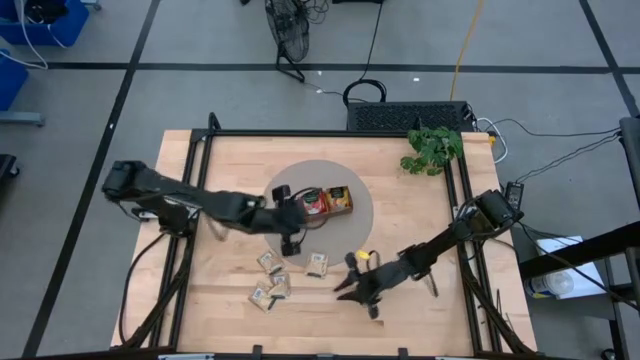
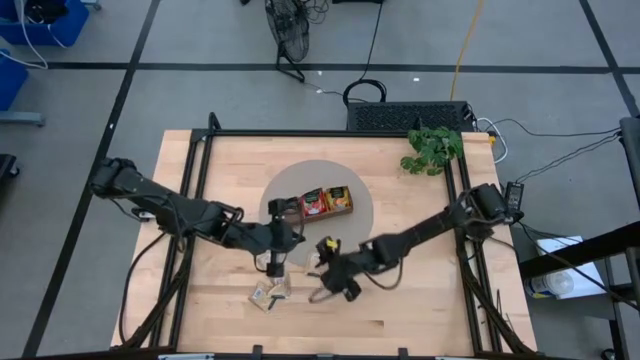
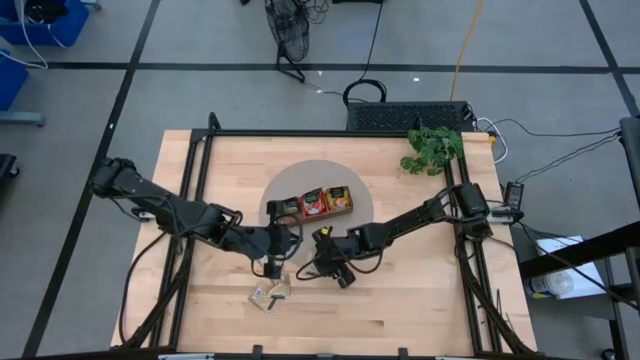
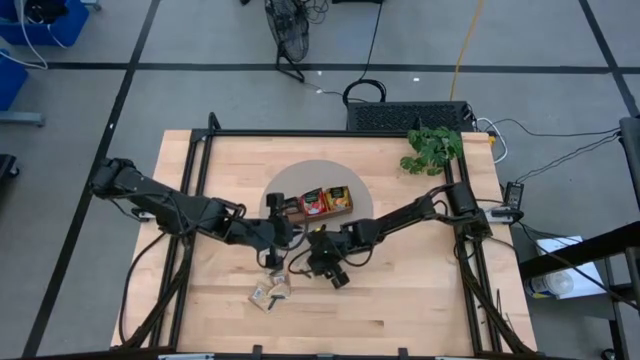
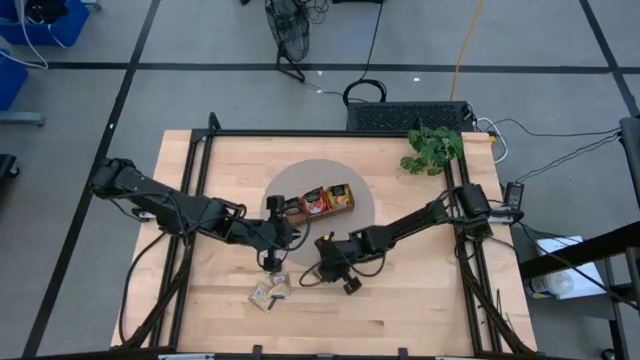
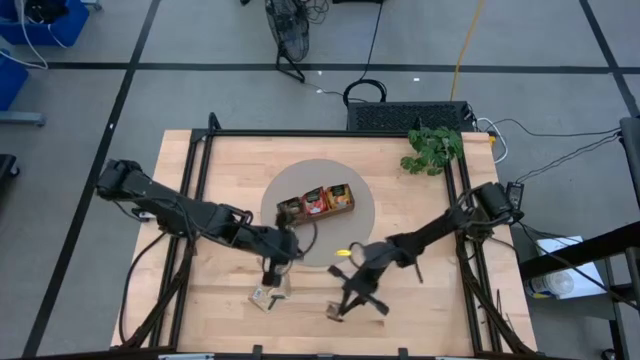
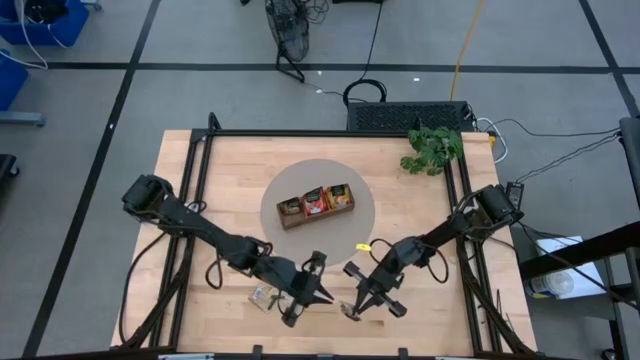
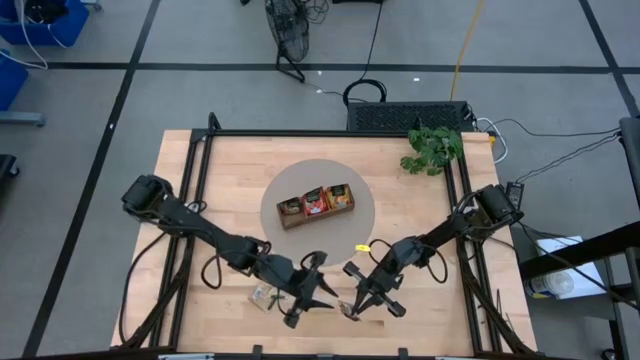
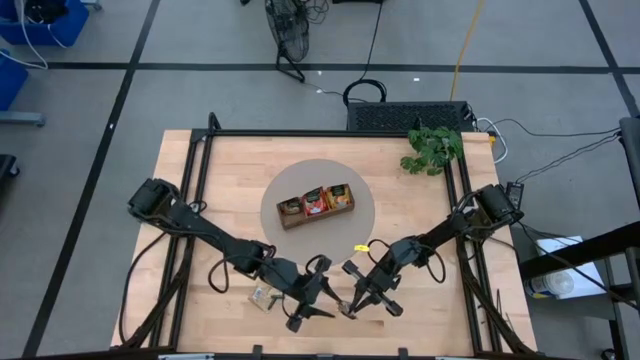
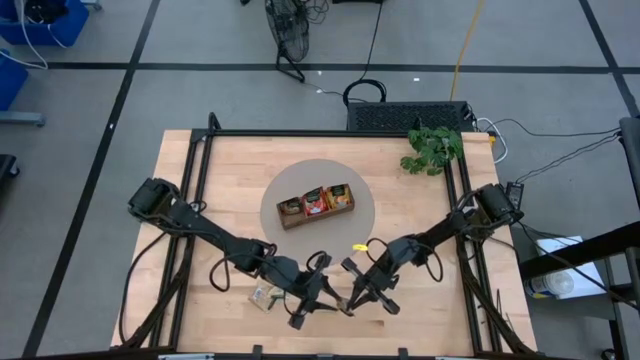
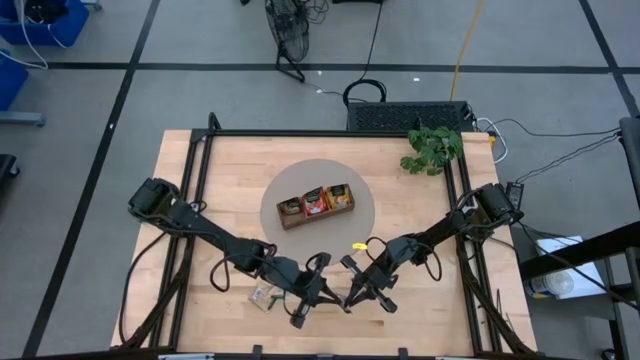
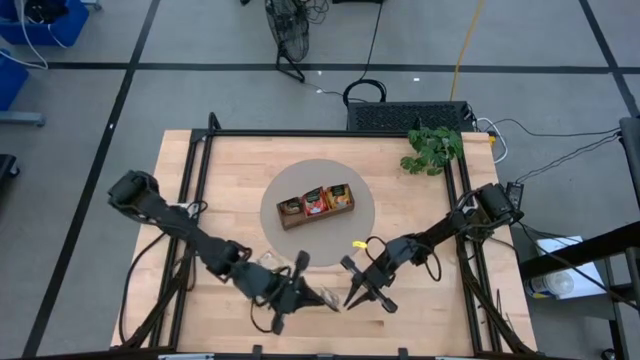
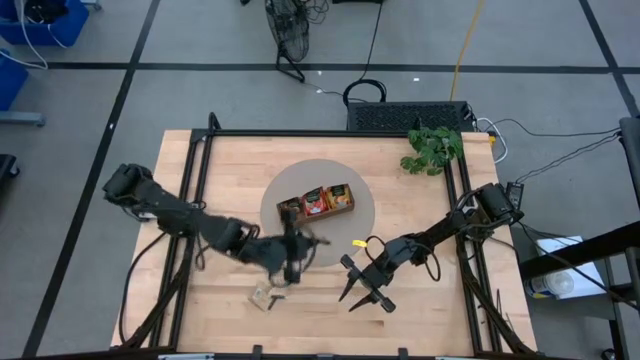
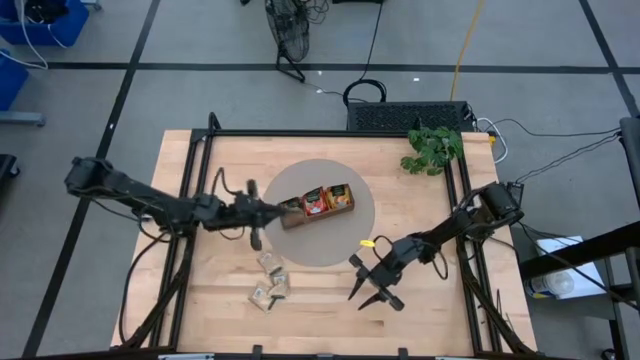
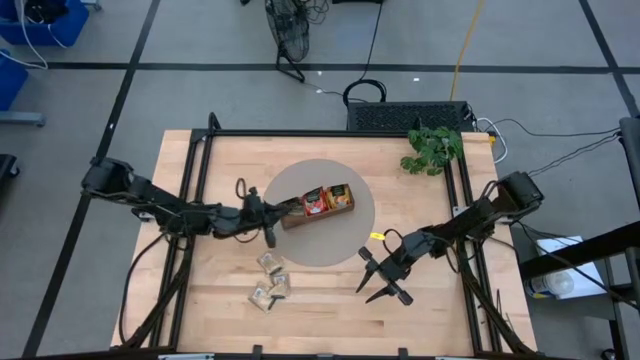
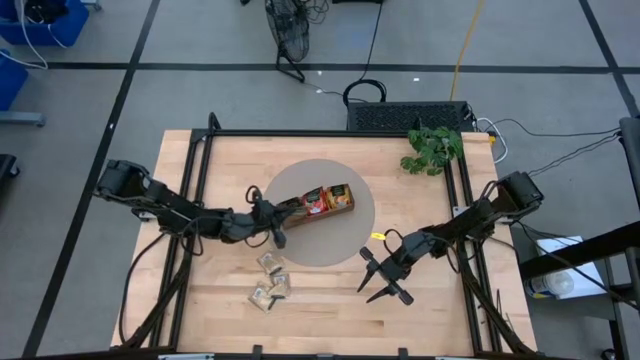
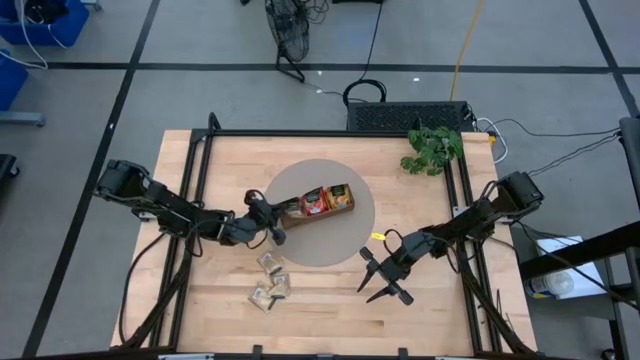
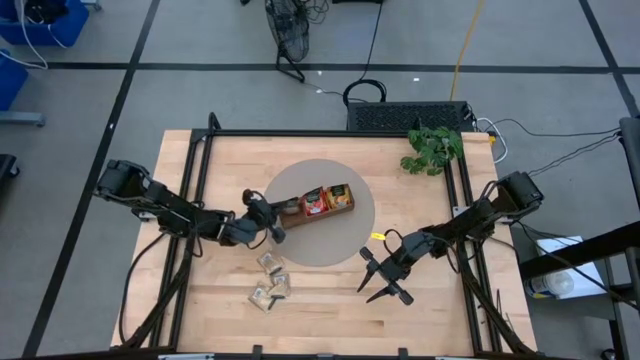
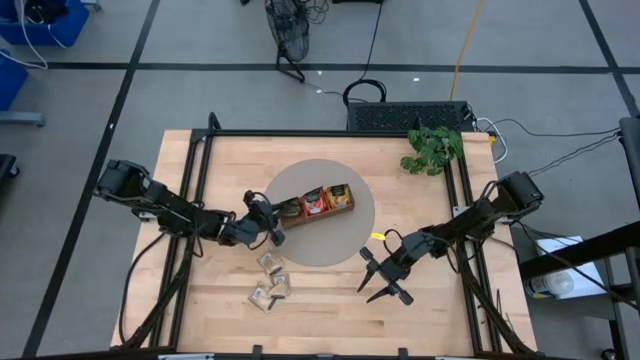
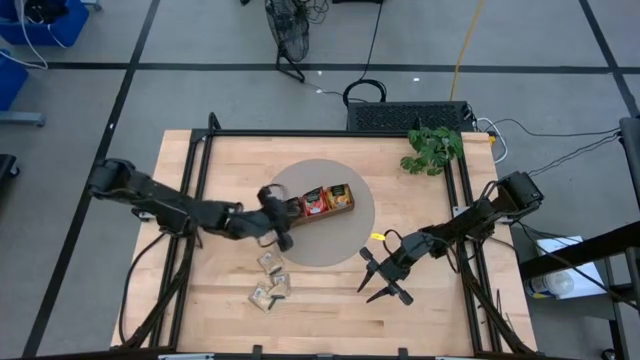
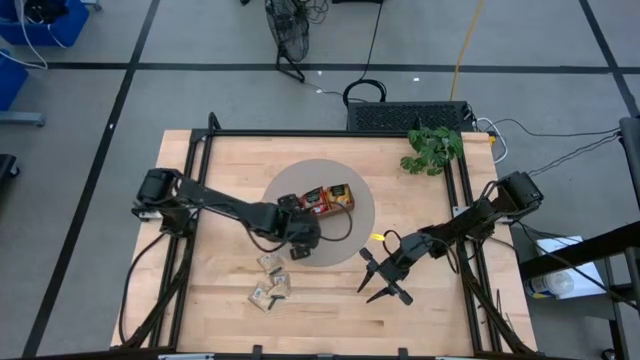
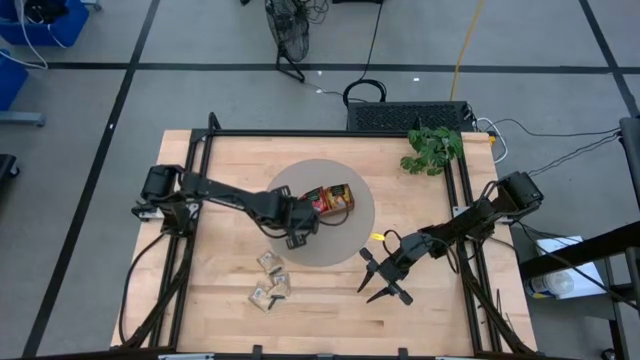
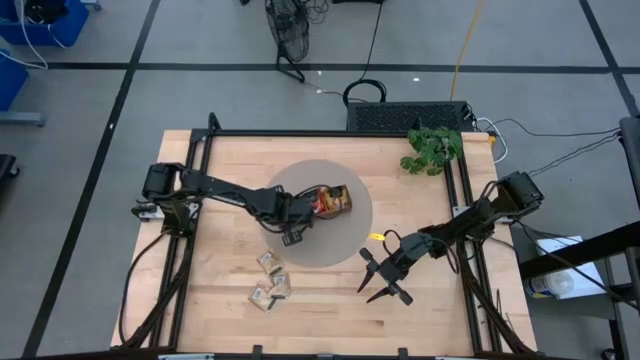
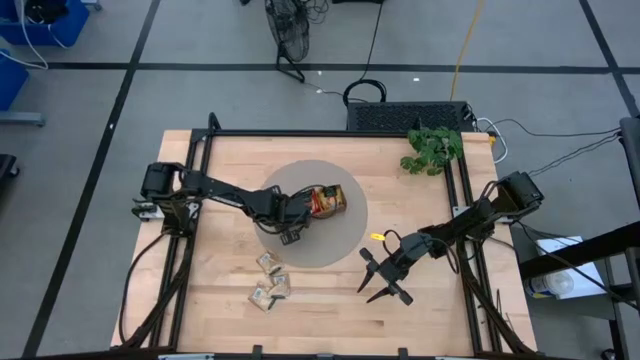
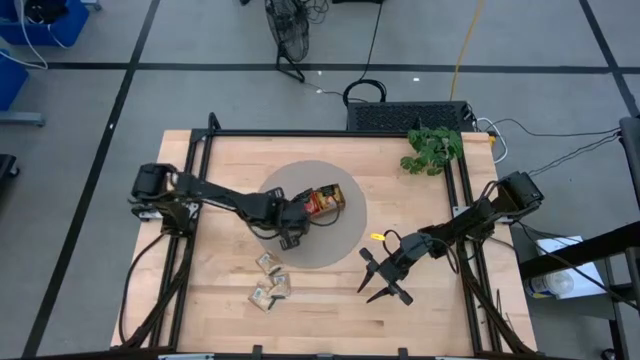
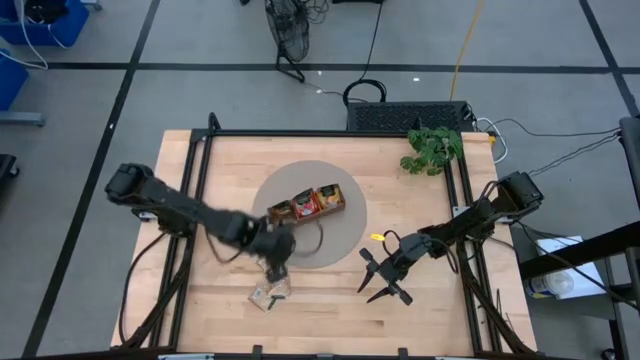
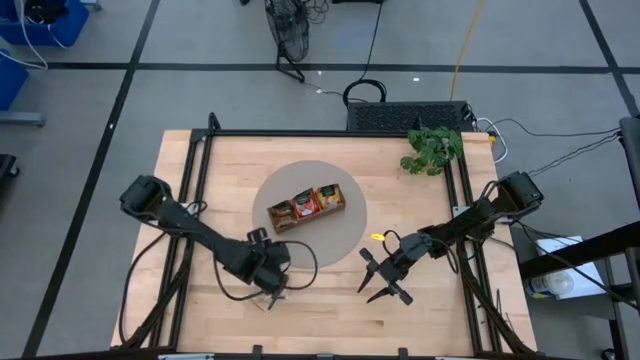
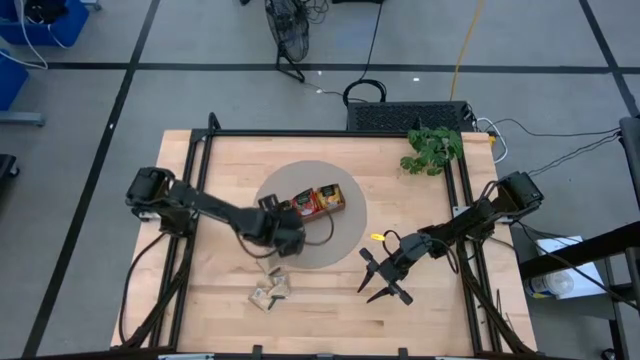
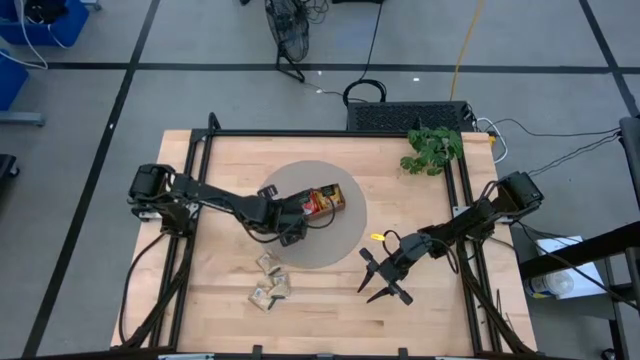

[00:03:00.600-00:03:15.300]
Task: Pick & Place Tea
Put the brown tea bag into the wooden organizer

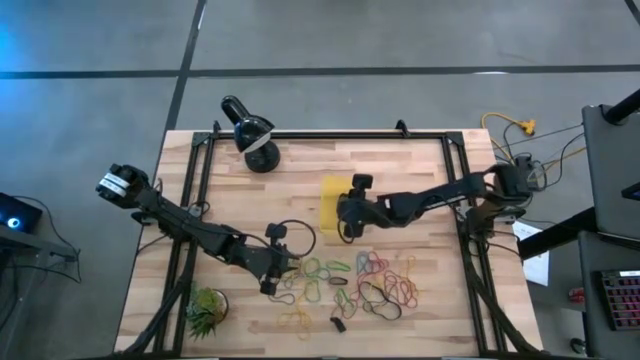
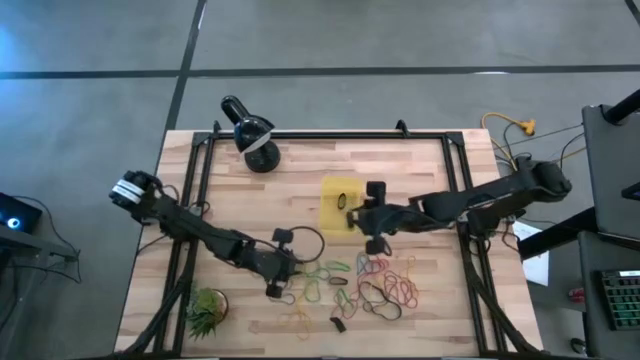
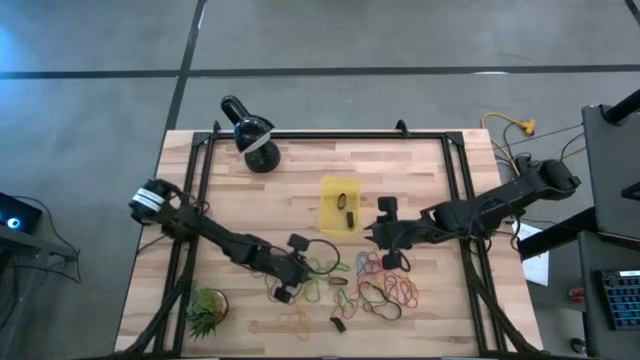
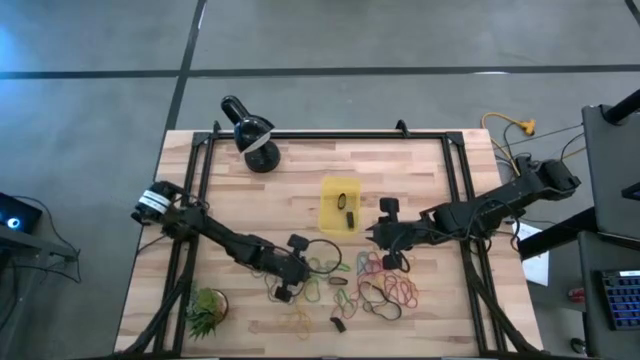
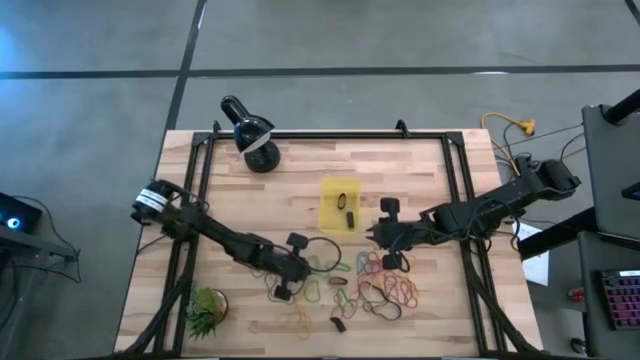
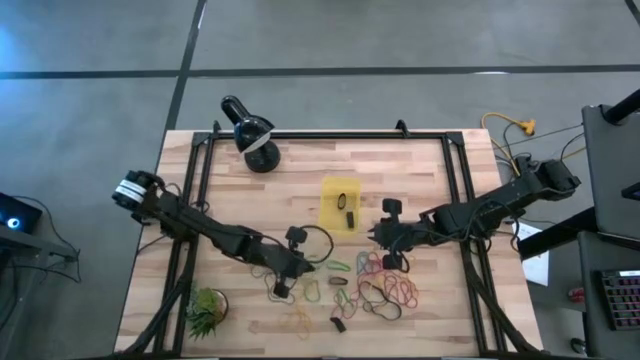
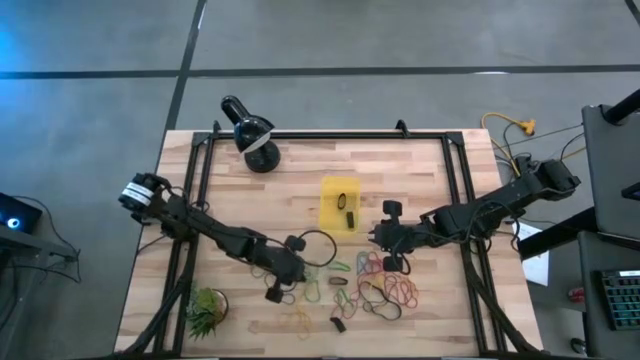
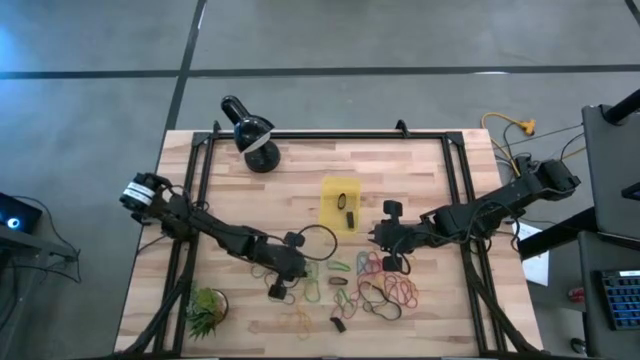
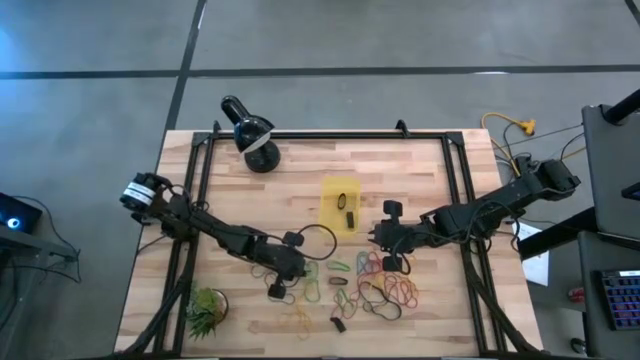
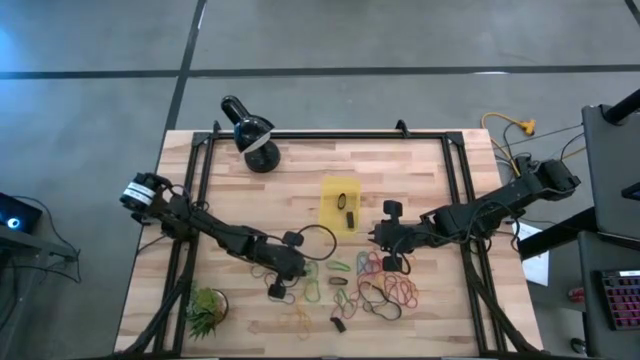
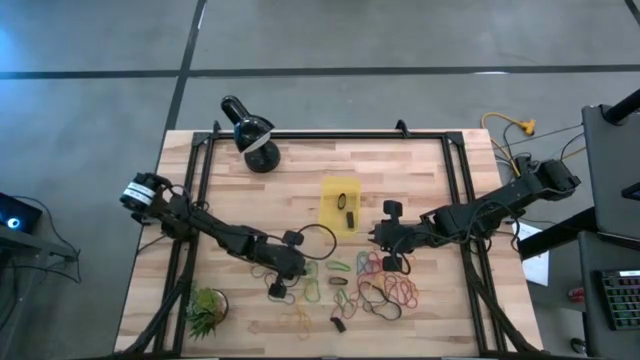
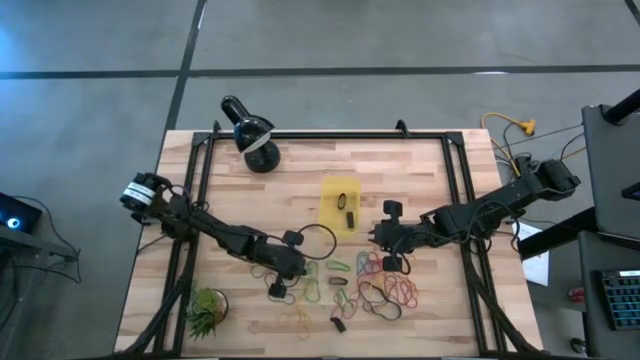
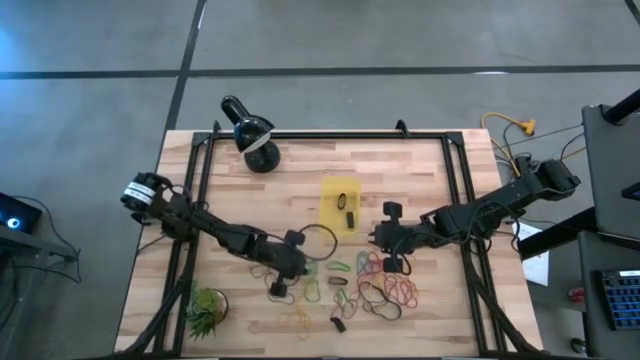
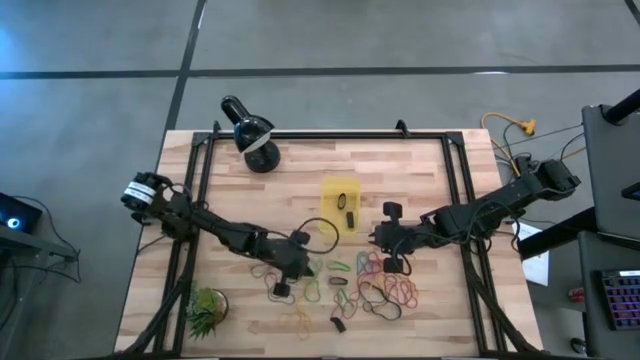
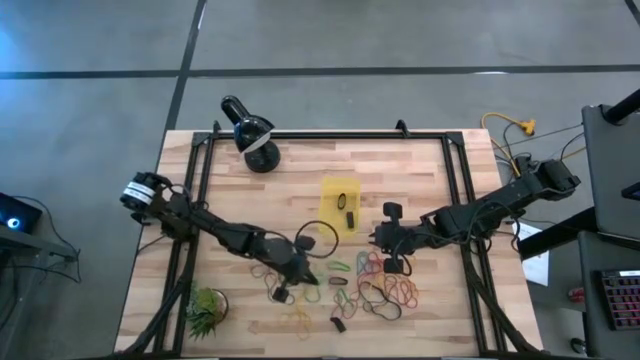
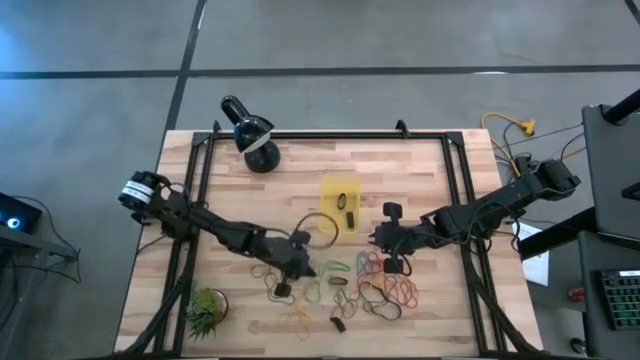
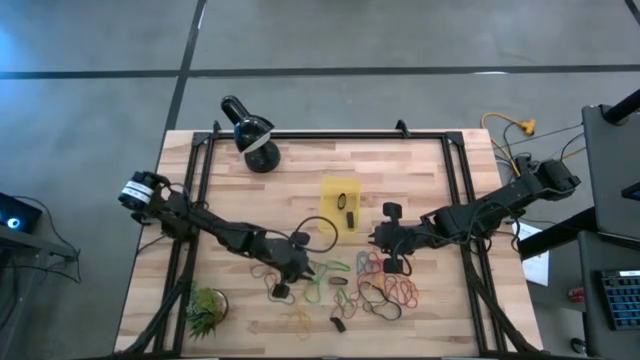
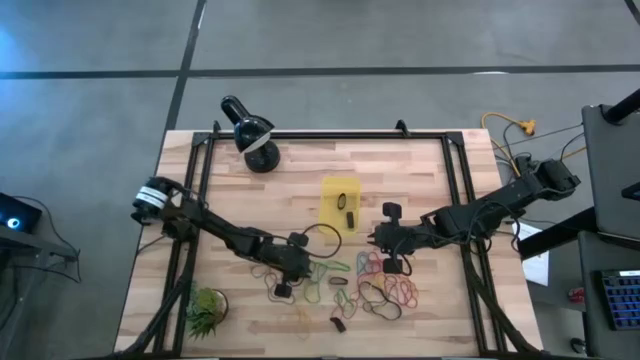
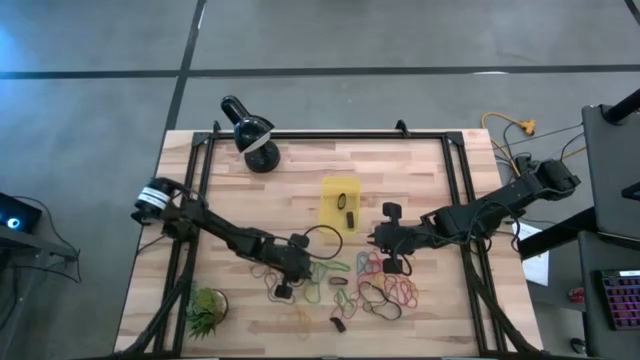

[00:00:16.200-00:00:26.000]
Task: Pick and place rubber bands into bin
Put the green rubber band into the yellow bin
